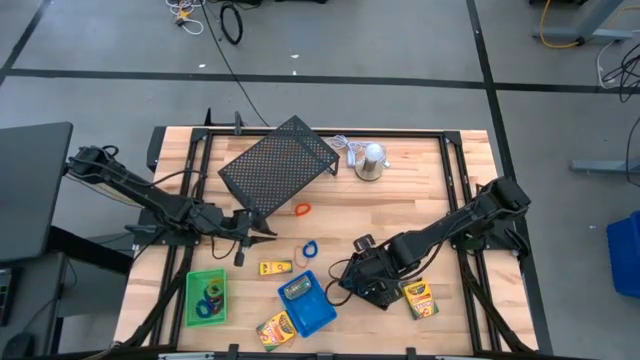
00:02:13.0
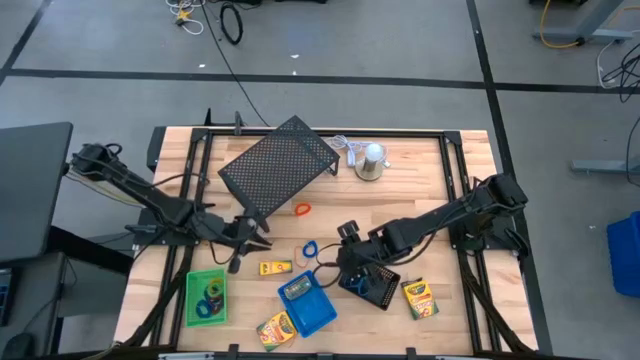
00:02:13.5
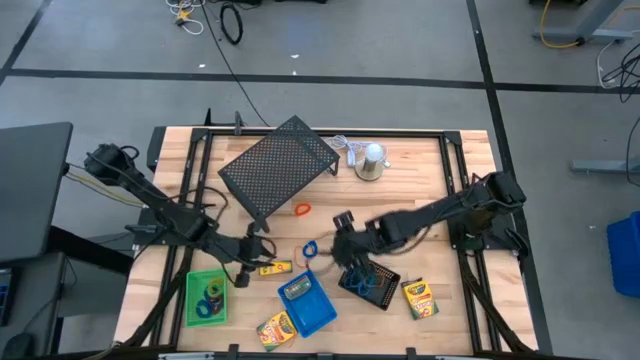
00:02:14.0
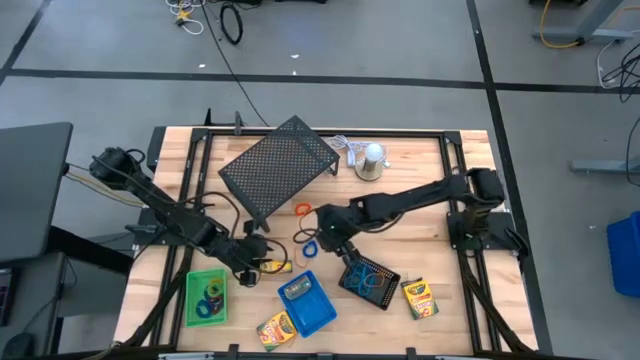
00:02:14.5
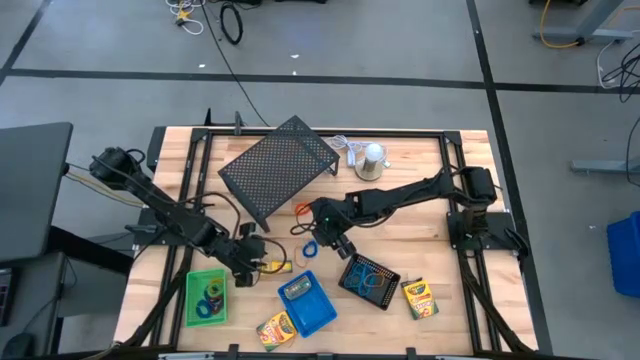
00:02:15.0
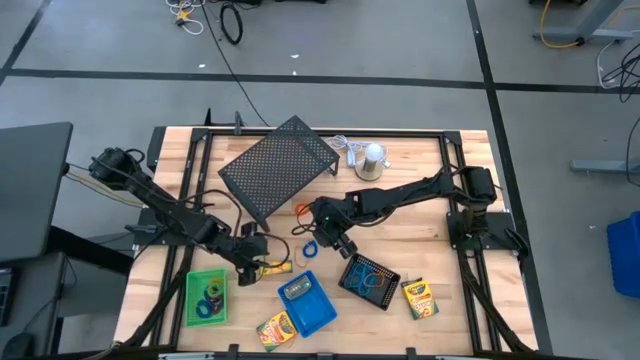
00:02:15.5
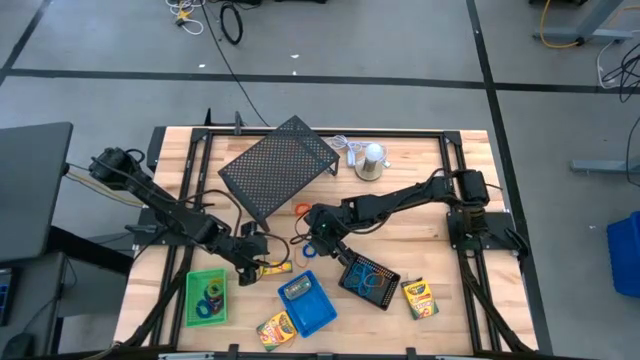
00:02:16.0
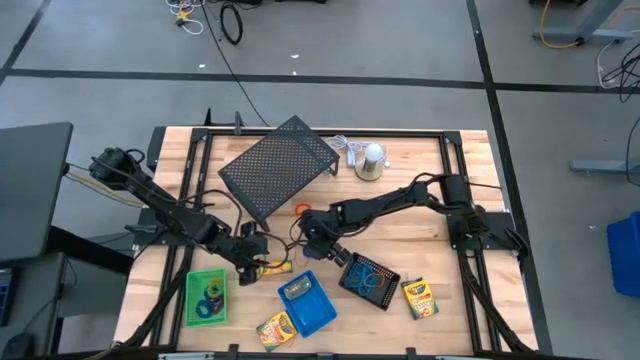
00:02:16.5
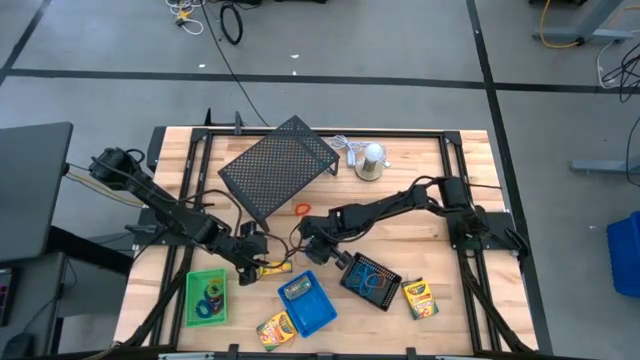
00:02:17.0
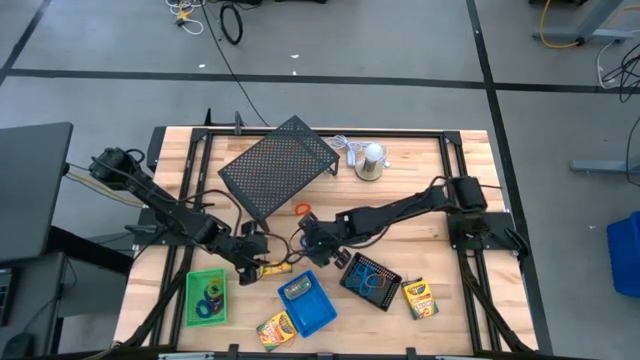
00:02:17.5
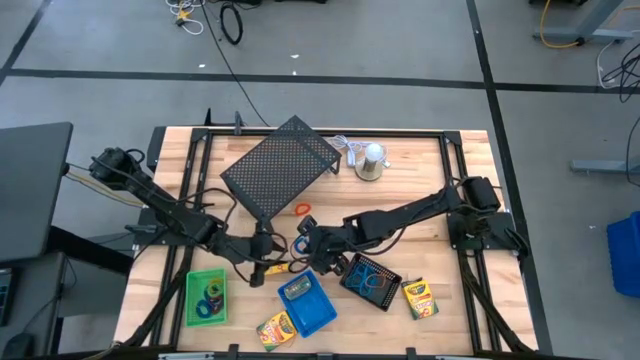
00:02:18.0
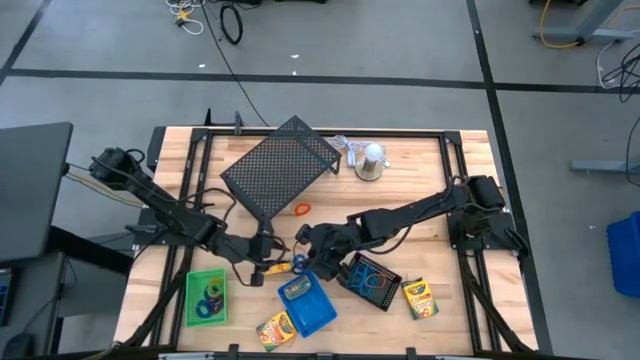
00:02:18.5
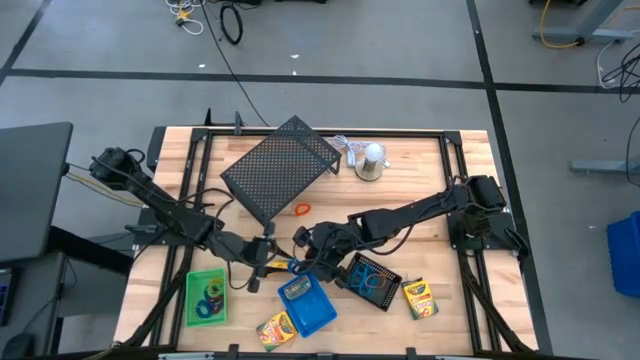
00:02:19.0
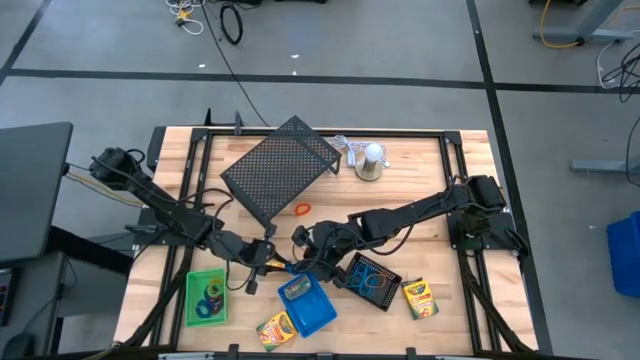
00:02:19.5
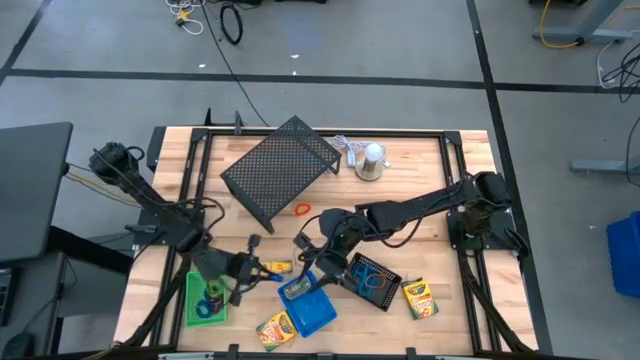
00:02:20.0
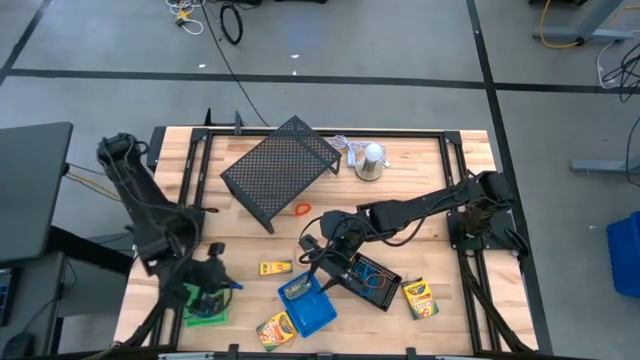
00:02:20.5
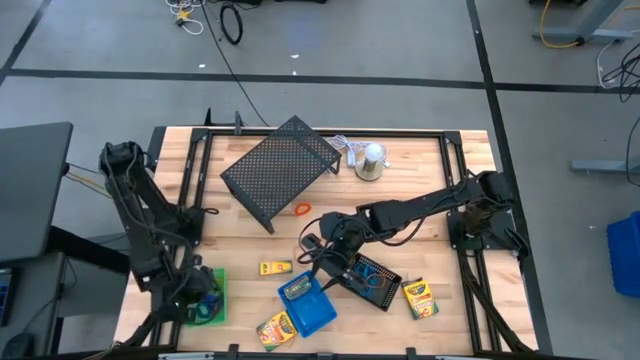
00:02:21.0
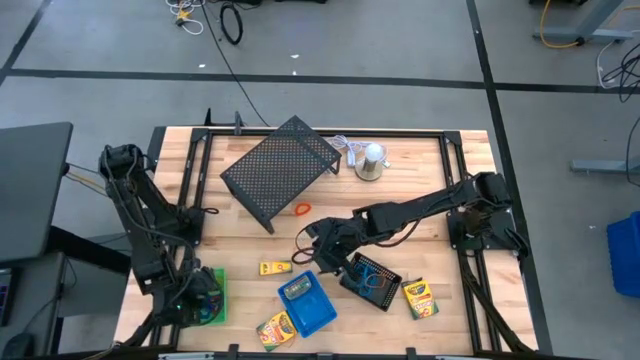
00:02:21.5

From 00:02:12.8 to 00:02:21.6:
Task: Pick & Place Office Desk Supplies
Put the blue spiral keychain into the green bin

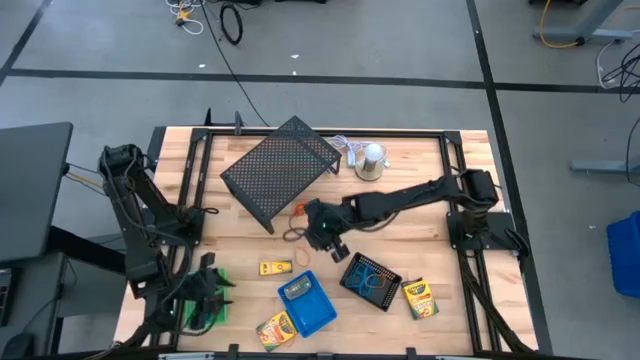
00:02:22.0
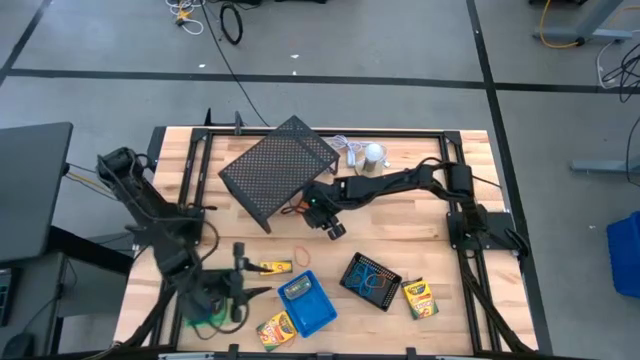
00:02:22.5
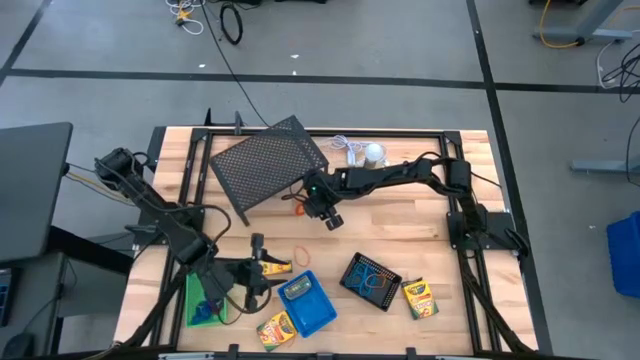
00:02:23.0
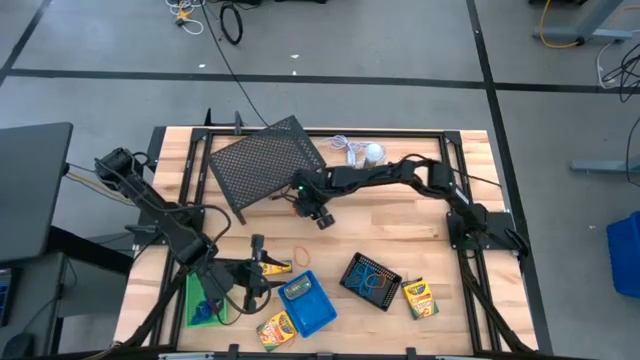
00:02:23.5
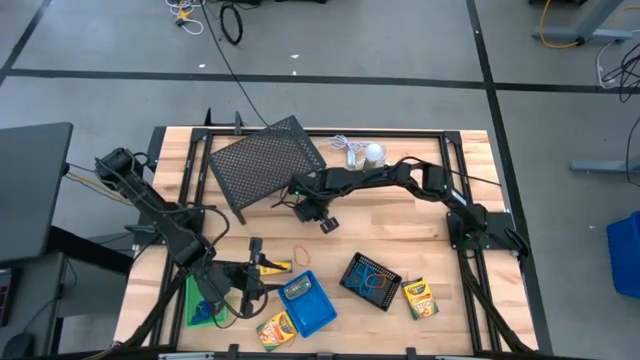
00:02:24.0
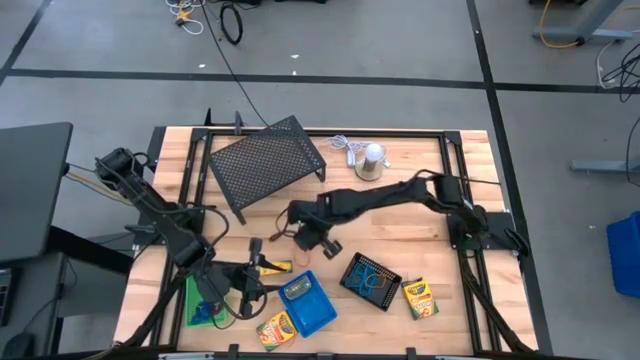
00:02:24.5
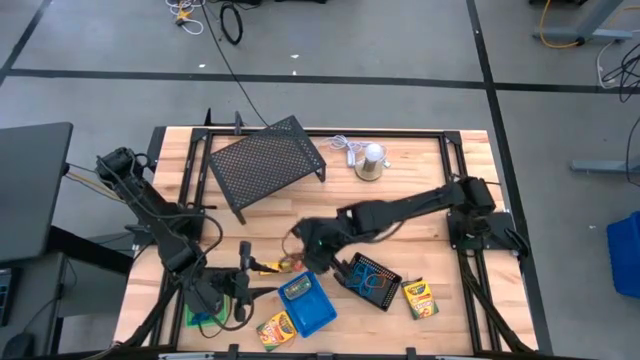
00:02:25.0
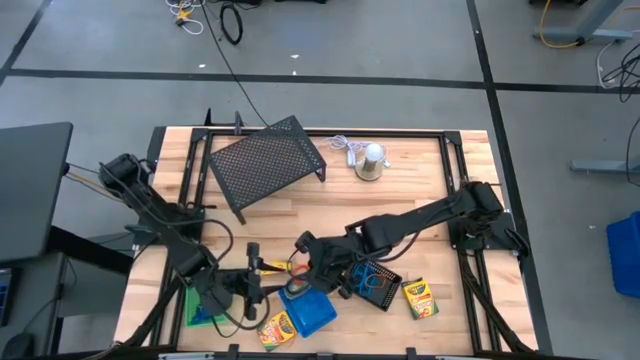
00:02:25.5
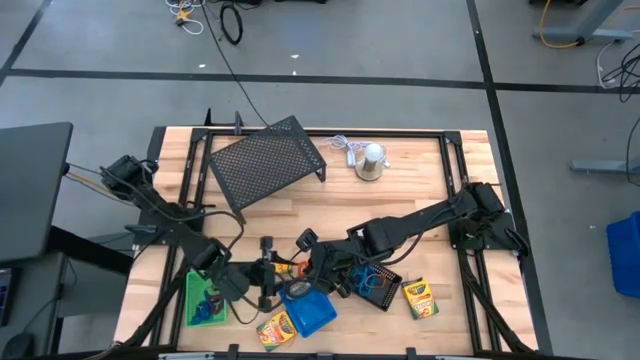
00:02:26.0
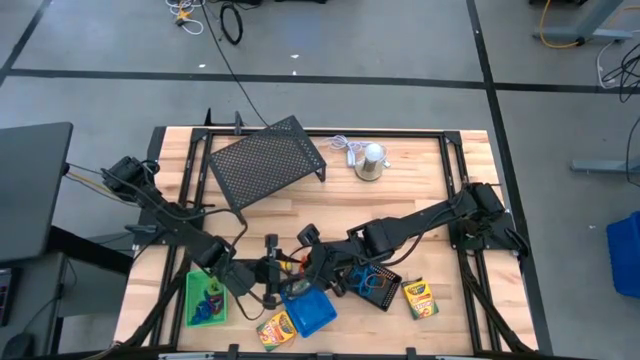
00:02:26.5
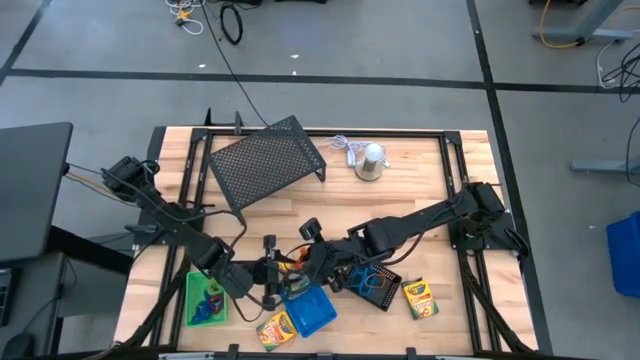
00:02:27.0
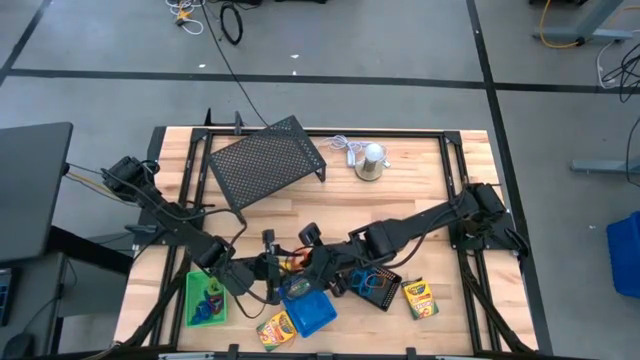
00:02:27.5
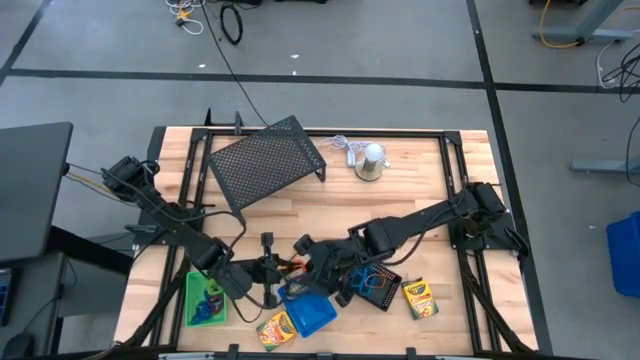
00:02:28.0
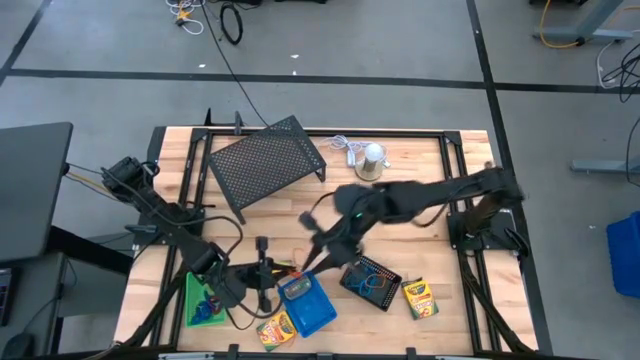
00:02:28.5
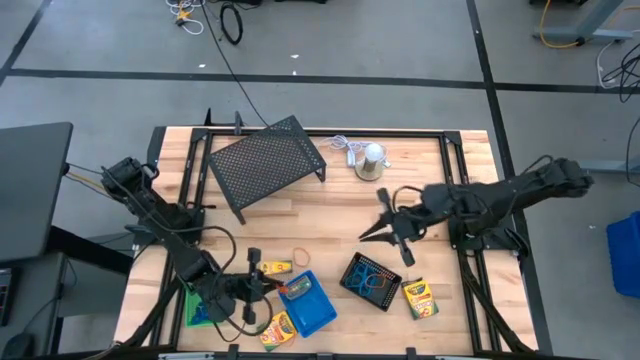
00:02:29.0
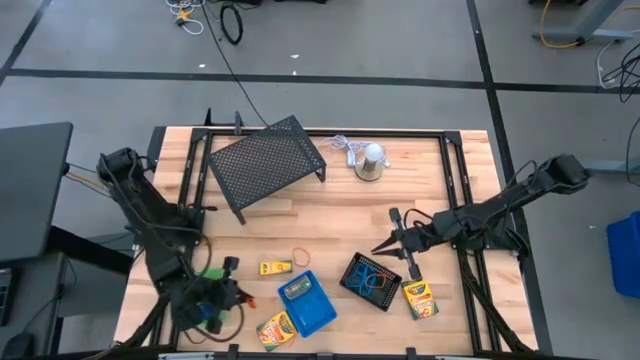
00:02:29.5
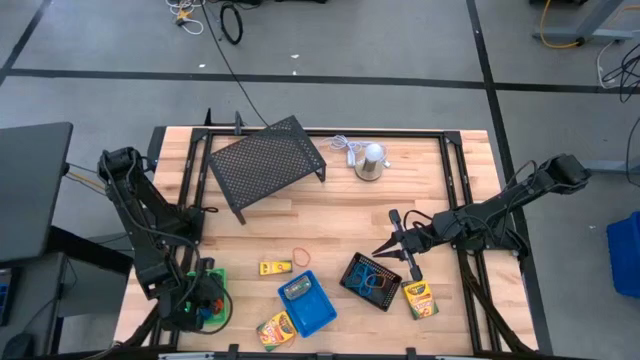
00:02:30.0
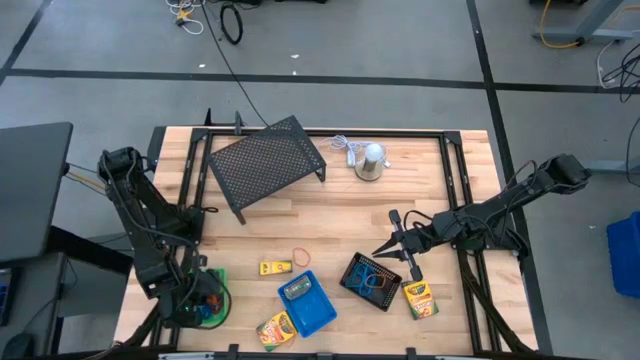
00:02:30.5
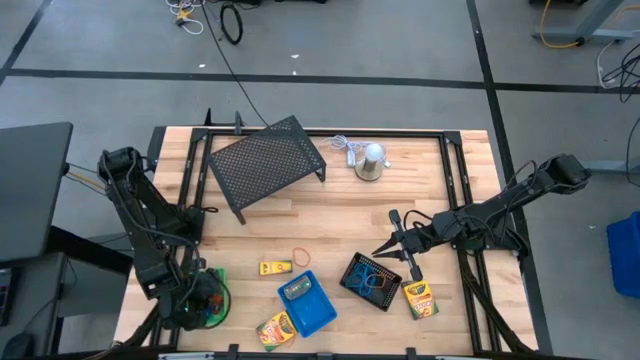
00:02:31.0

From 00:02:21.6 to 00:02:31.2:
Put the orange spiral keychain into the green bin

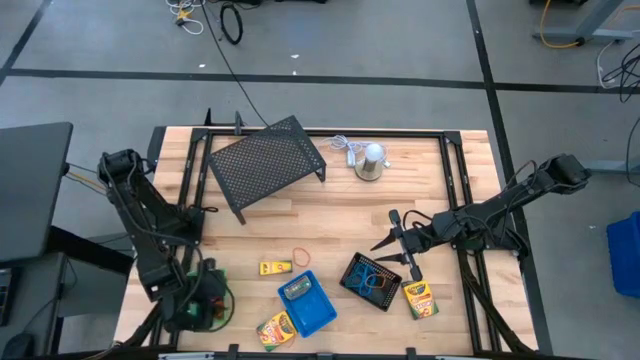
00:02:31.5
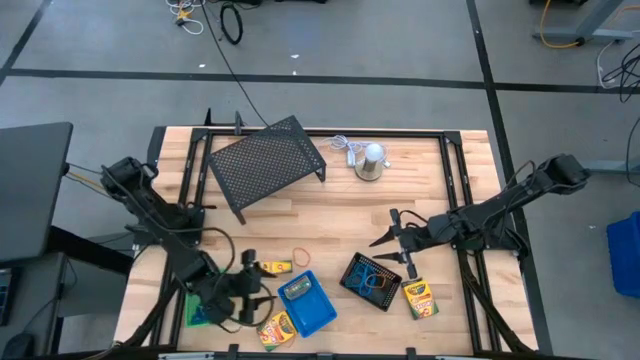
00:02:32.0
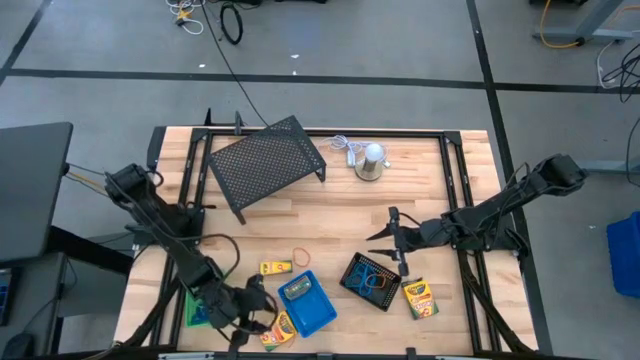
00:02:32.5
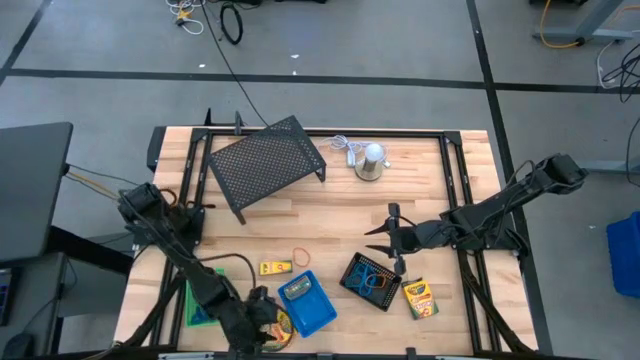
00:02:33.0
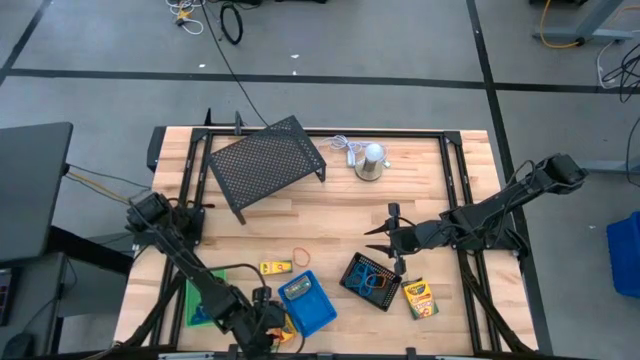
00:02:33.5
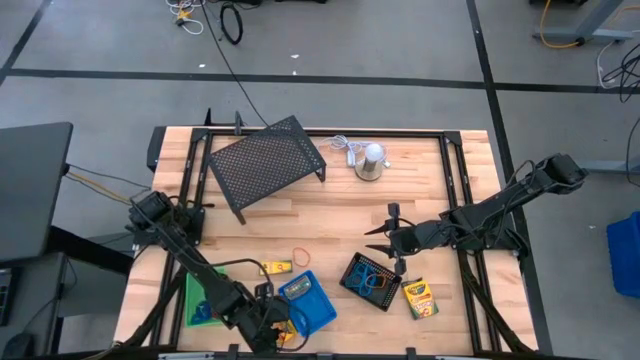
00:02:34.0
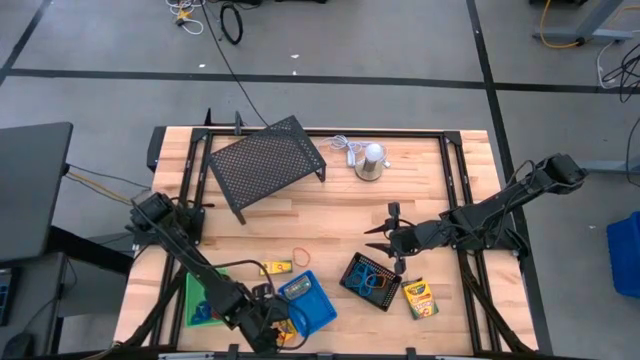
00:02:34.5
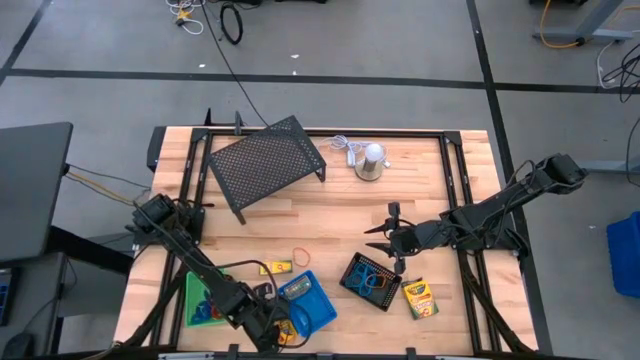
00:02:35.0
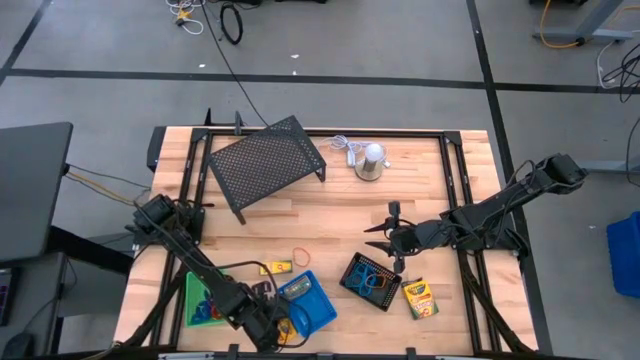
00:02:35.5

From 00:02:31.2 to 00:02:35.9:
Put the orange rubber band into the black bin
